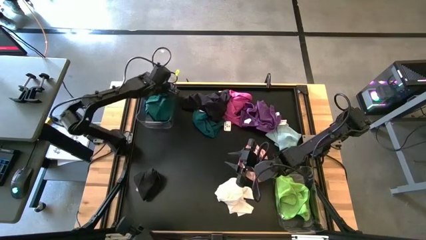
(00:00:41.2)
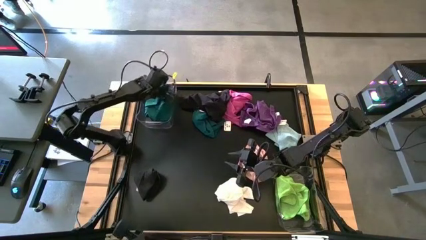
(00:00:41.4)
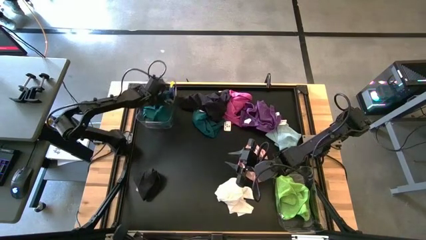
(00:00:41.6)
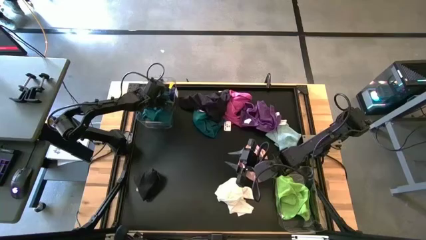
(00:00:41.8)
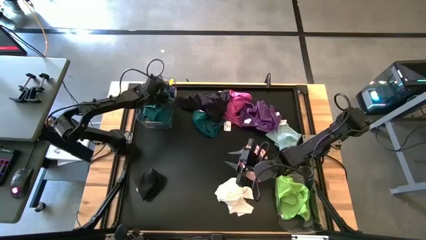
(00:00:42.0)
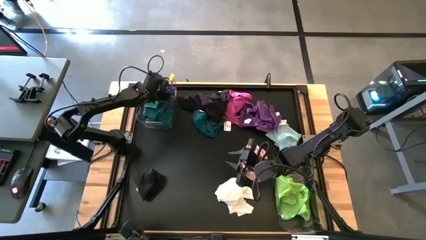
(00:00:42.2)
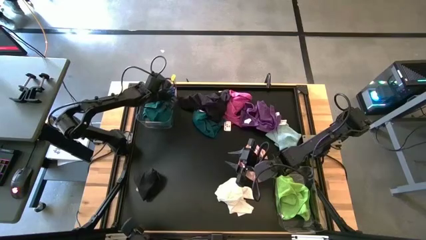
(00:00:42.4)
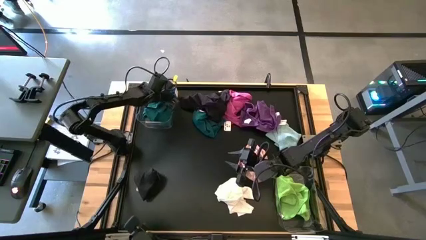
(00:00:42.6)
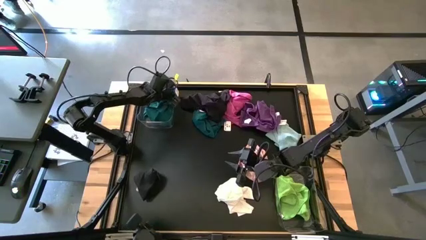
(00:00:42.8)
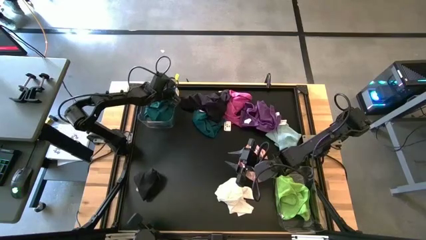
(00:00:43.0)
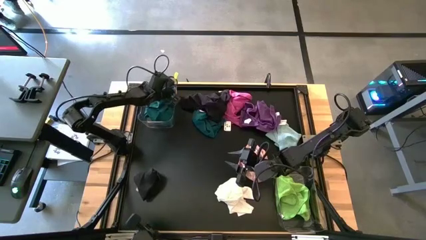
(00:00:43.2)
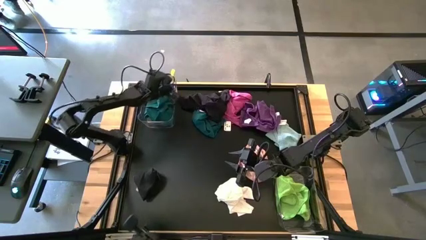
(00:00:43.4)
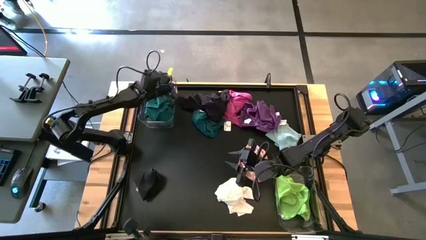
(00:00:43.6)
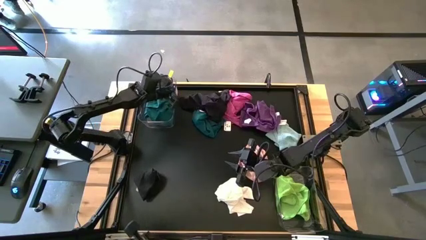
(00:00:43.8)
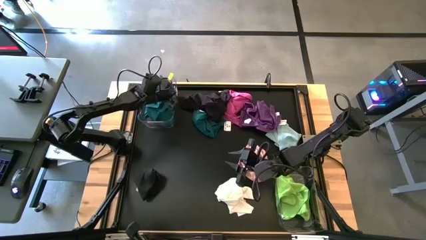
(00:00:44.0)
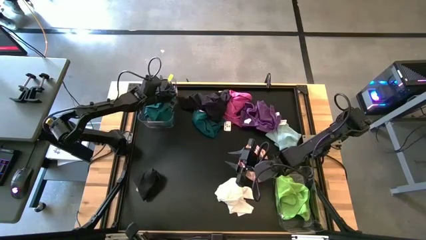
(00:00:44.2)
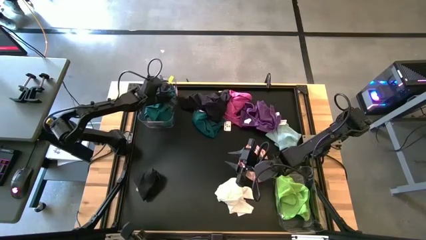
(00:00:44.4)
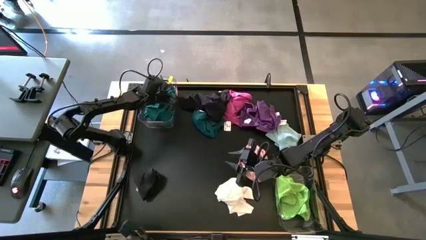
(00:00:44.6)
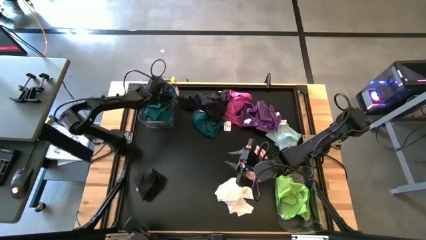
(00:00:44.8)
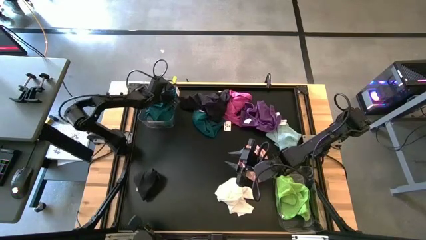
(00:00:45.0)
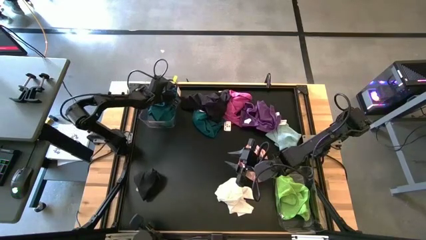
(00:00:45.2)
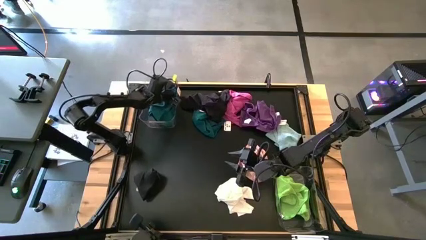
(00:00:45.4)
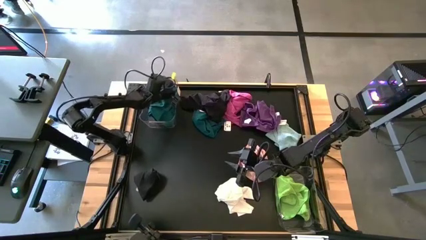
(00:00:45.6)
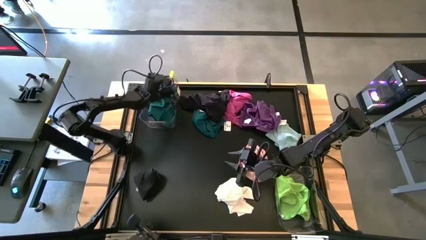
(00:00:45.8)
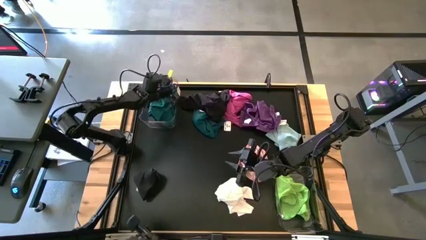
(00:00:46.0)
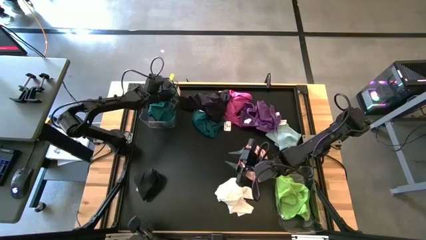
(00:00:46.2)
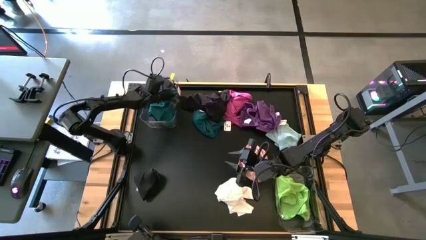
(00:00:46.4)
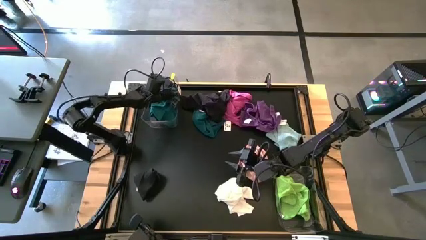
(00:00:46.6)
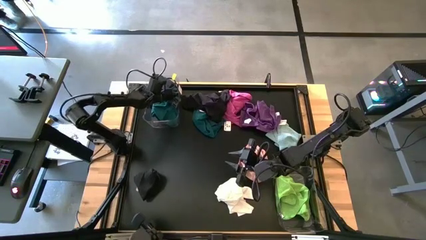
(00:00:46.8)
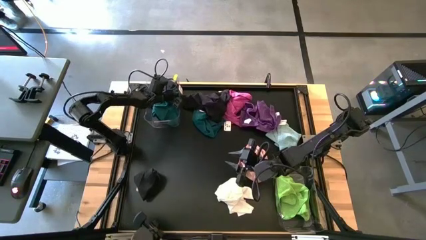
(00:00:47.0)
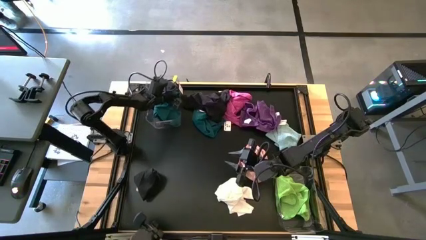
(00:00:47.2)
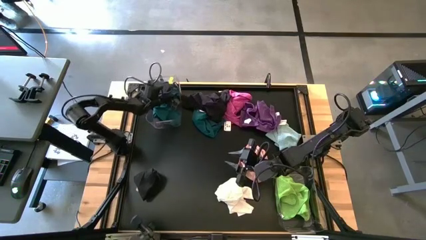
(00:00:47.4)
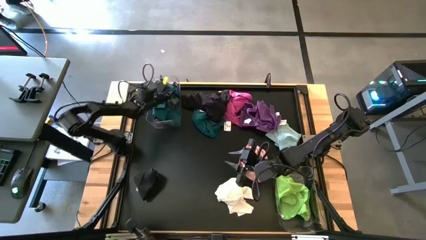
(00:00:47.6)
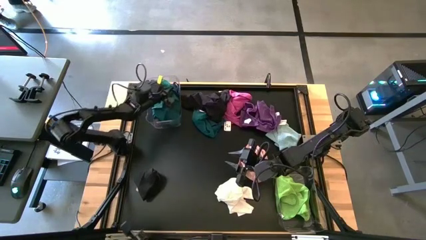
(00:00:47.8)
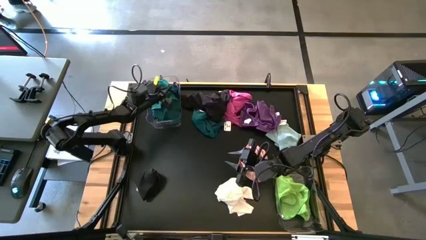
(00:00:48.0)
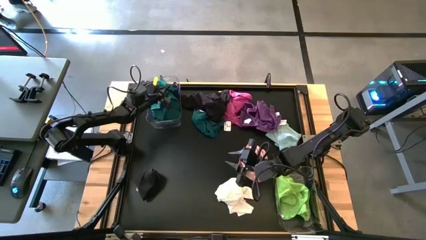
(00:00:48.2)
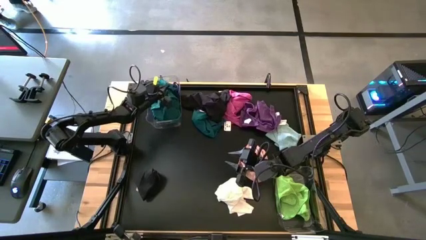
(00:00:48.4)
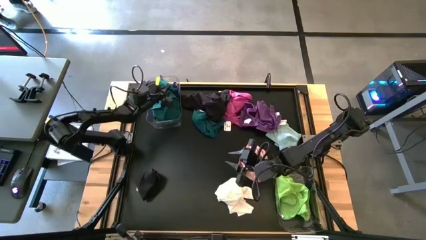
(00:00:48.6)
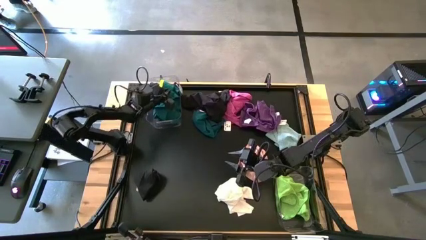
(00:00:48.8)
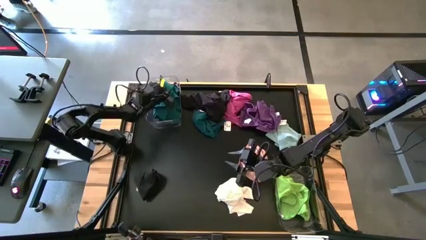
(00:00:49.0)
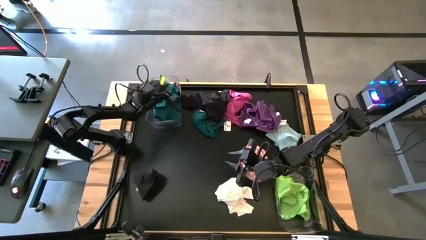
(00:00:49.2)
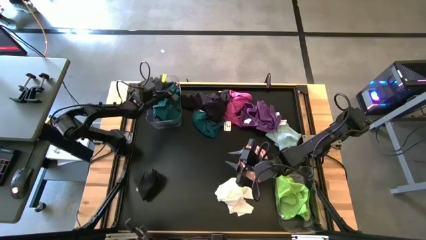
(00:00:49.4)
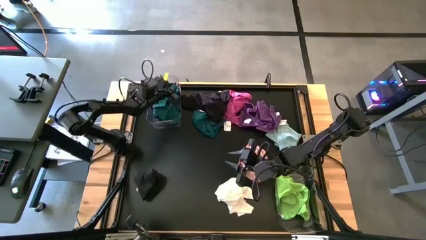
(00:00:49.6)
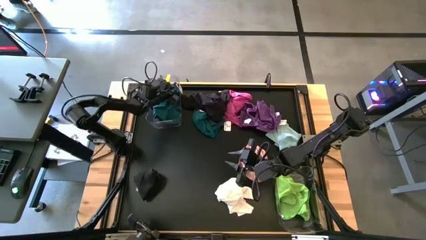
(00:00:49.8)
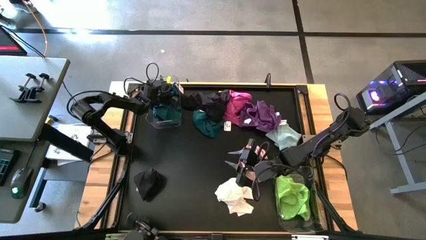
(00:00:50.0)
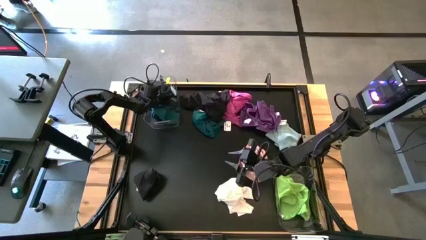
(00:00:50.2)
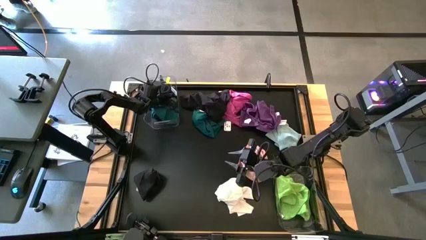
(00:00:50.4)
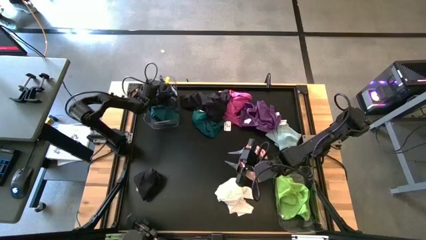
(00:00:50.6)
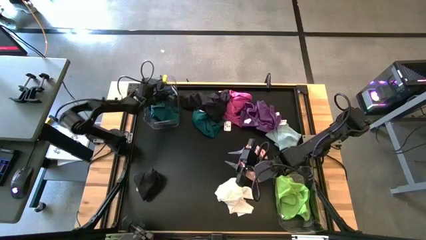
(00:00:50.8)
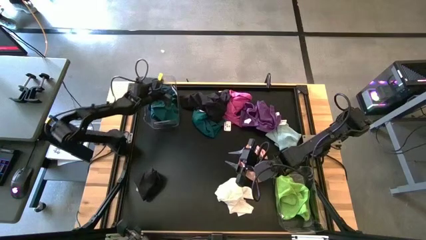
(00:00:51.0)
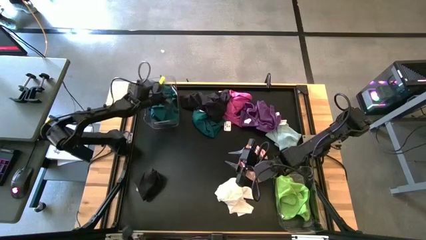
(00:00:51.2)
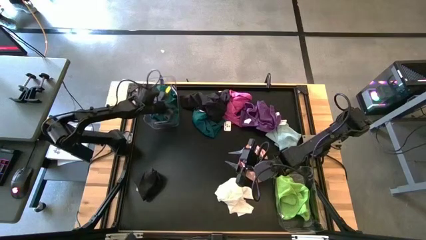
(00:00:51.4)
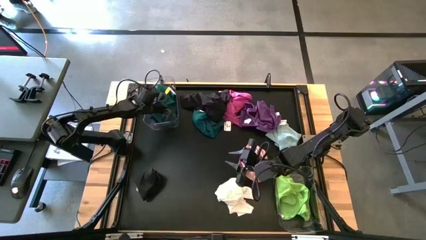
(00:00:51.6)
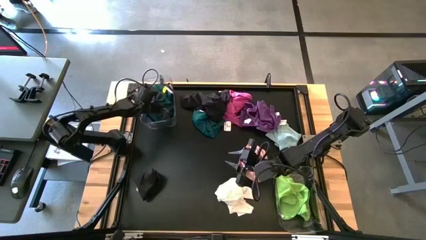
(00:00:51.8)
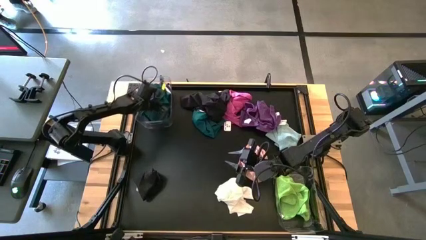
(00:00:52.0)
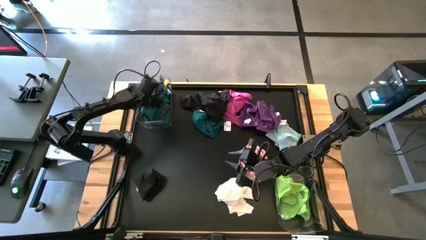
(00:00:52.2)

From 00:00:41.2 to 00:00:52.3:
Task: Sort towels by color in basket
Put the dark green towel into the top transparent bin
